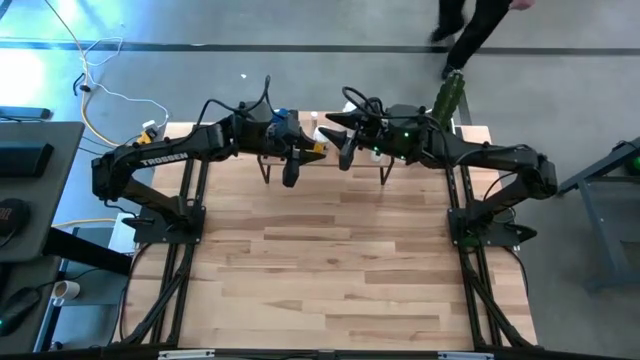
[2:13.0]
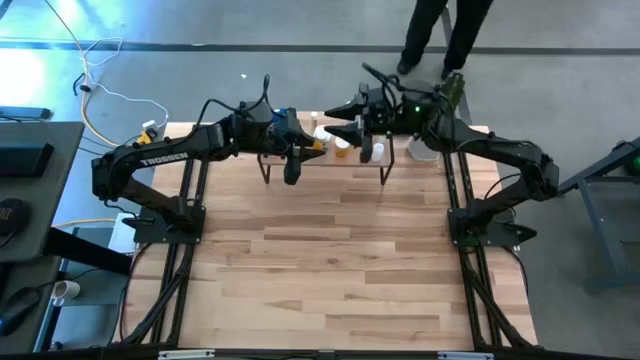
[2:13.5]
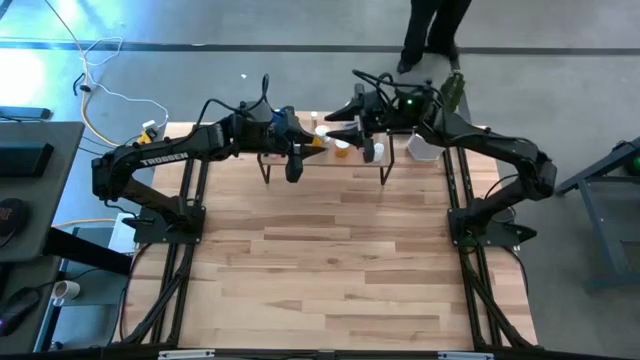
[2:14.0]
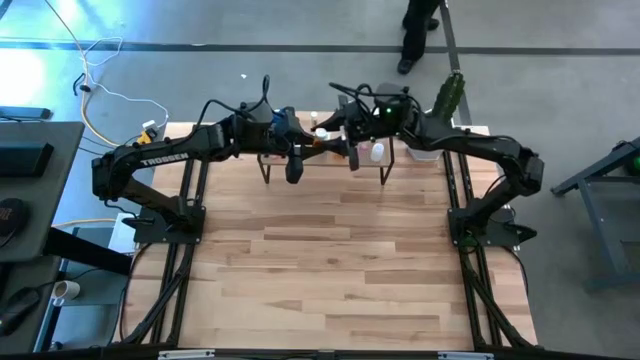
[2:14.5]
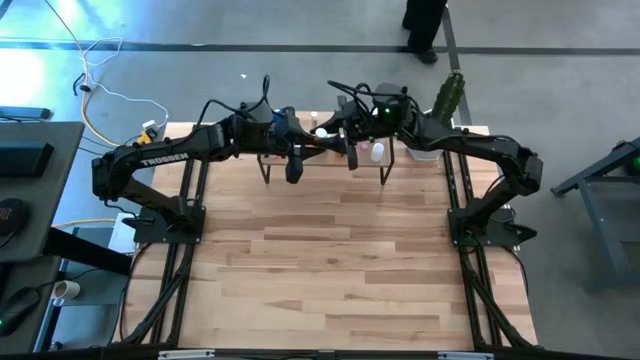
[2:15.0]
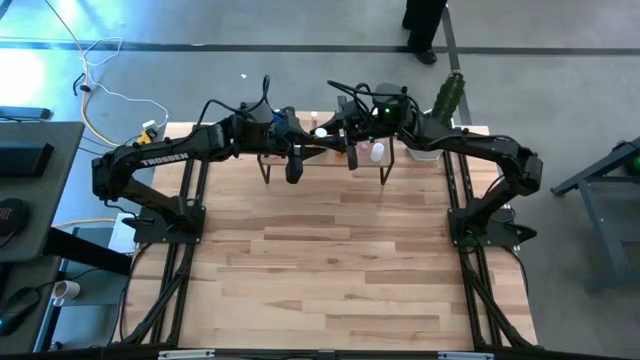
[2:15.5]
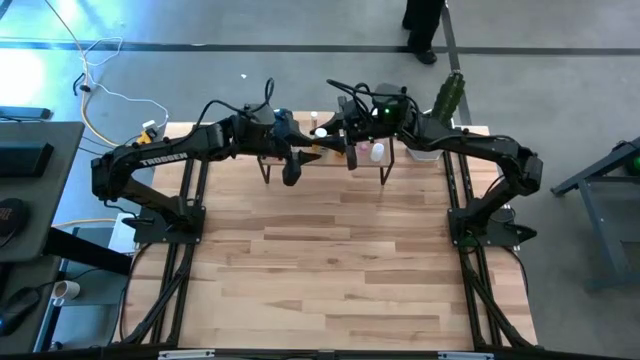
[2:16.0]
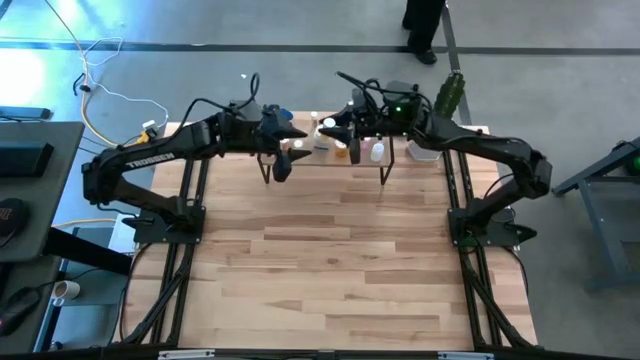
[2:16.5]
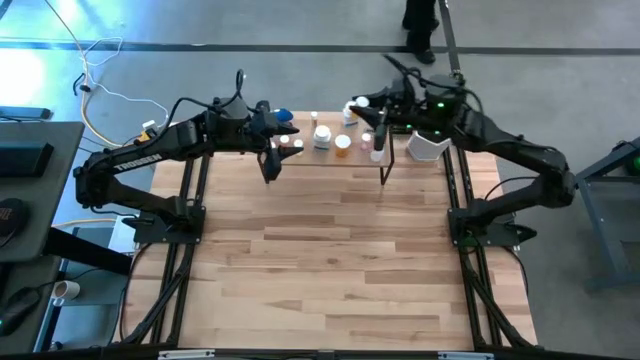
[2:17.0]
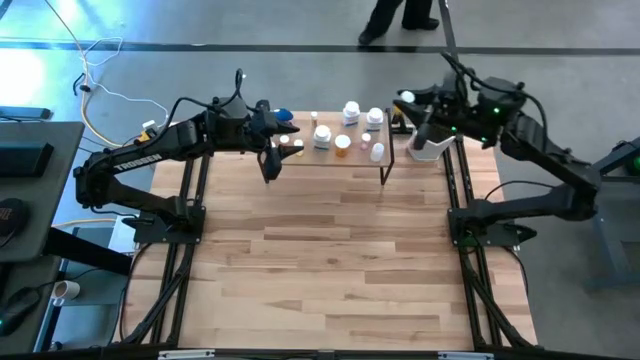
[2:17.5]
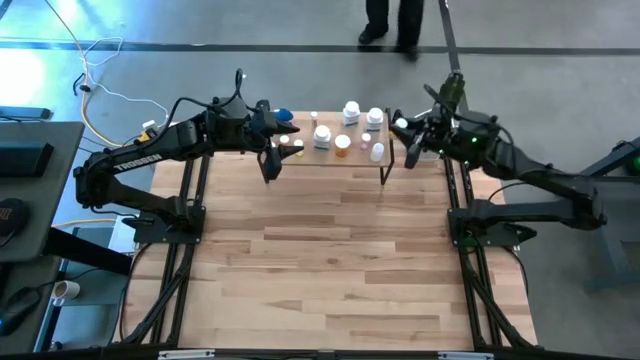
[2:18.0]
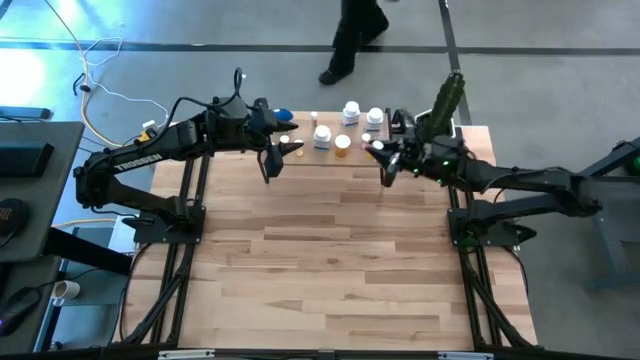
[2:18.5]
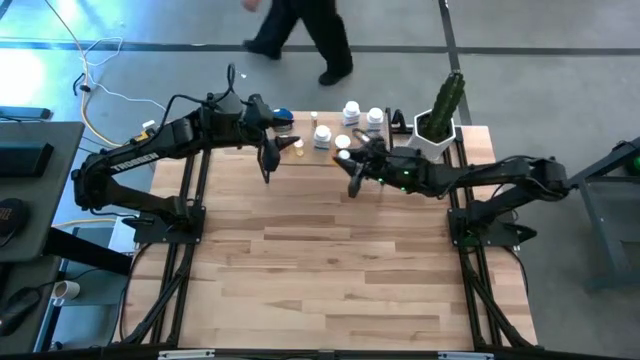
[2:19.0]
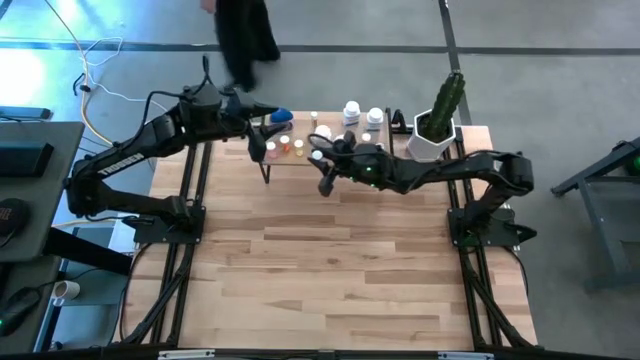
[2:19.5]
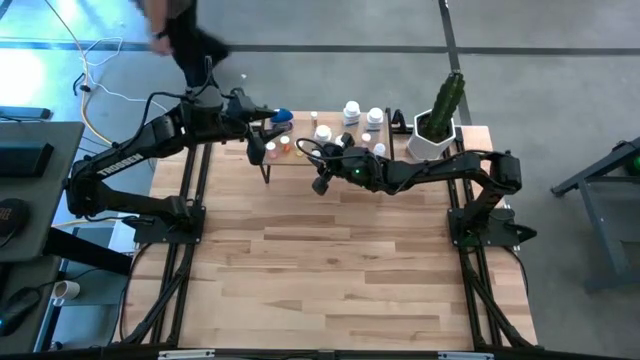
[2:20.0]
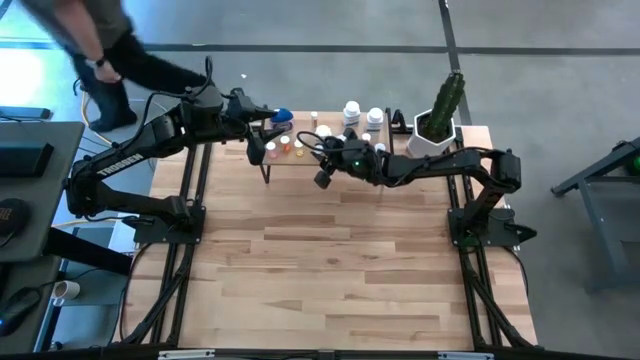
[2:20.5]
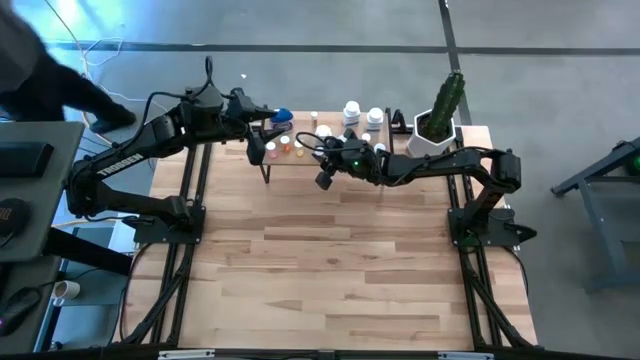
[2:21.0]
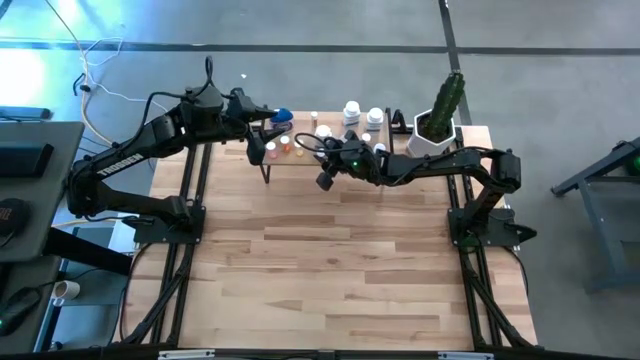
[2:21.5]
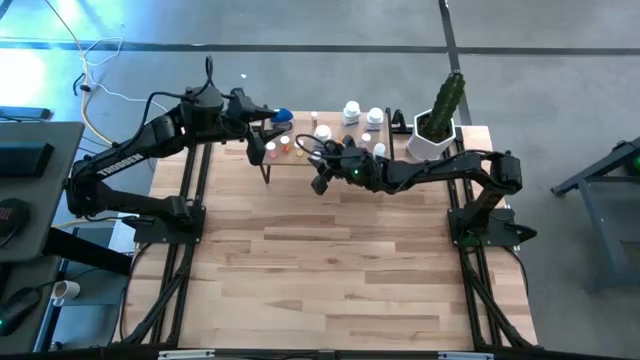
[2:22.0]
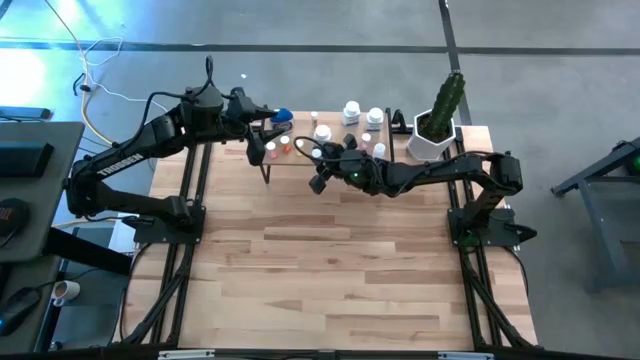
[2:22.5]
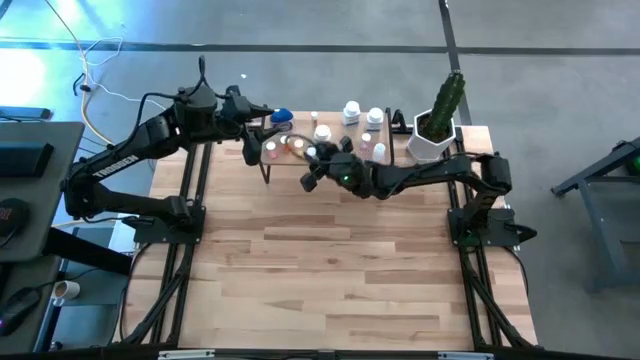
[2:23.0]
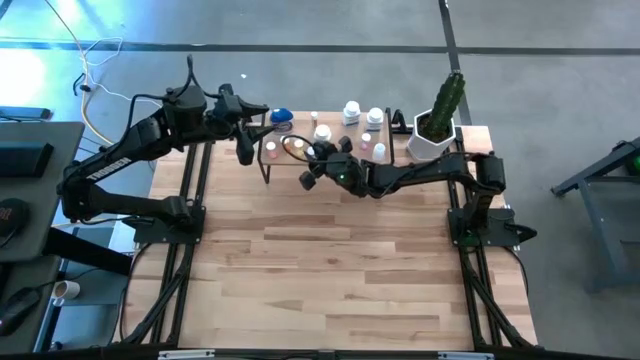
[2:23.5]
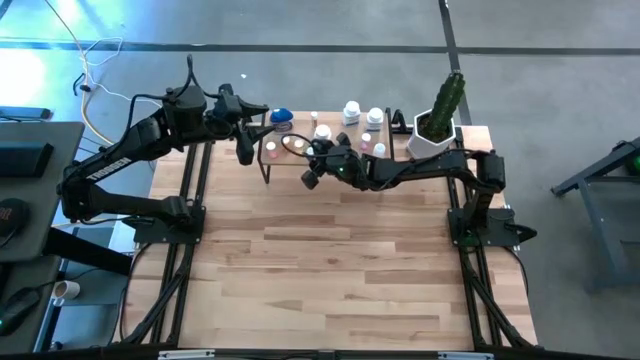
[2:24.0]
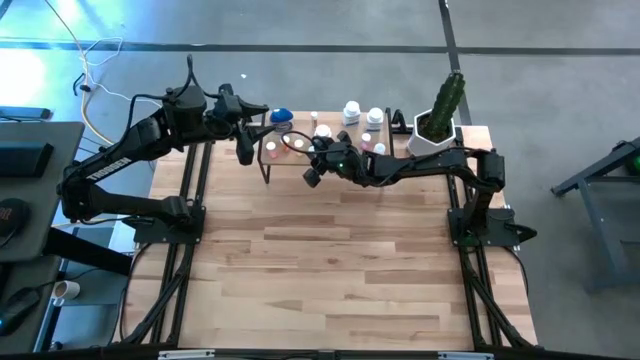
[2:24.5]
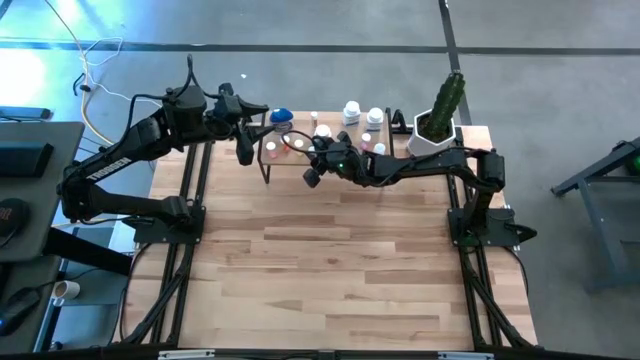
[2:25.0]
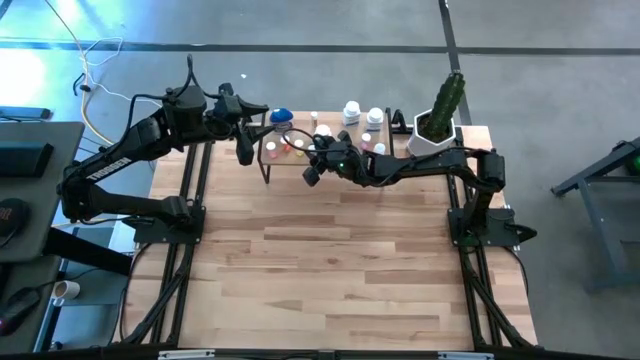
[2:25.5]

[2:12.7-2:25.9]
Task: Pick and place medicine bottles onto shelf by color
Put the orange pill bottle on the shelf

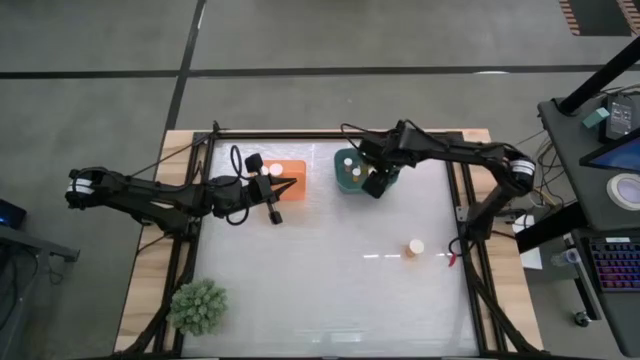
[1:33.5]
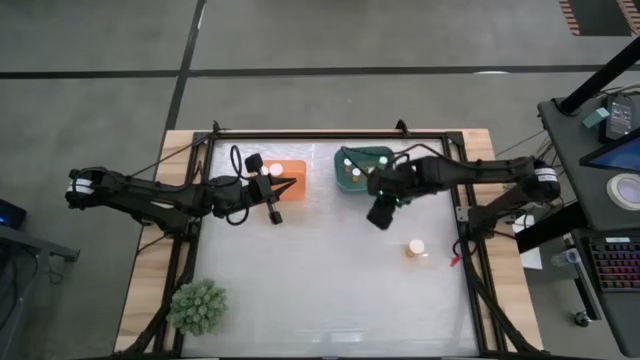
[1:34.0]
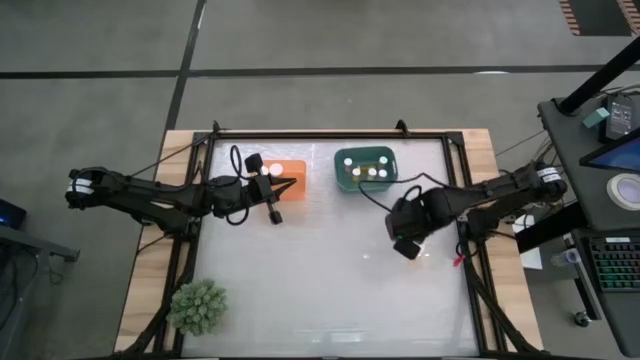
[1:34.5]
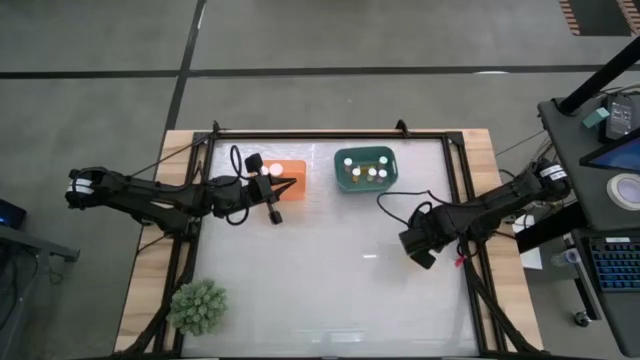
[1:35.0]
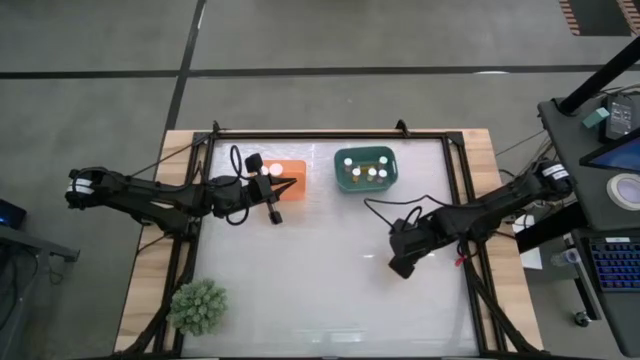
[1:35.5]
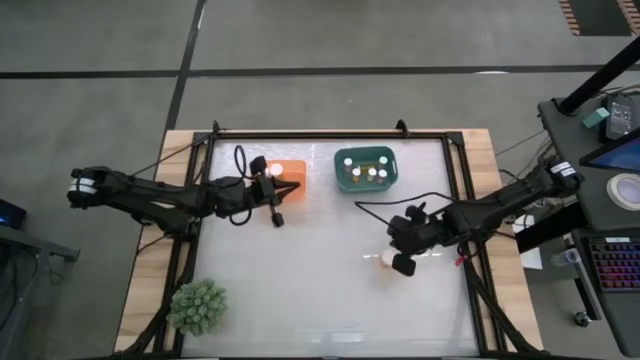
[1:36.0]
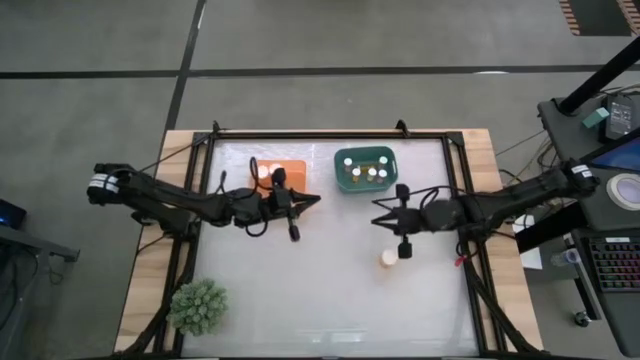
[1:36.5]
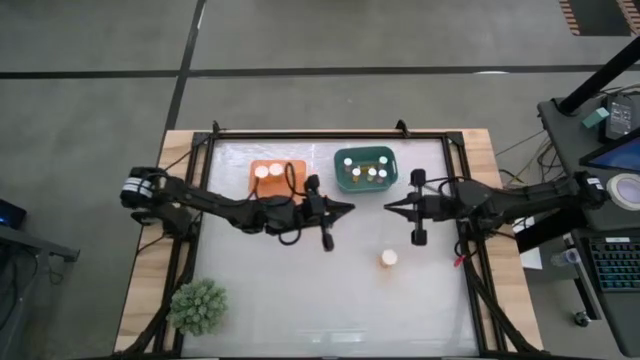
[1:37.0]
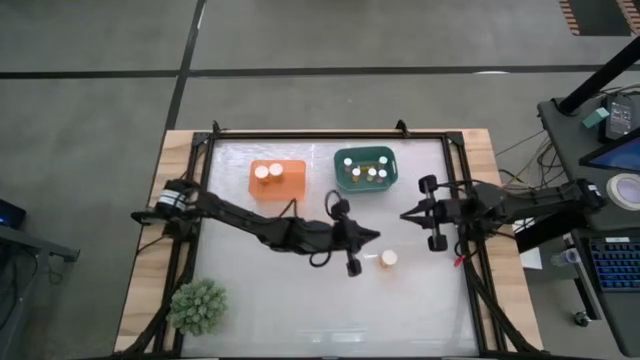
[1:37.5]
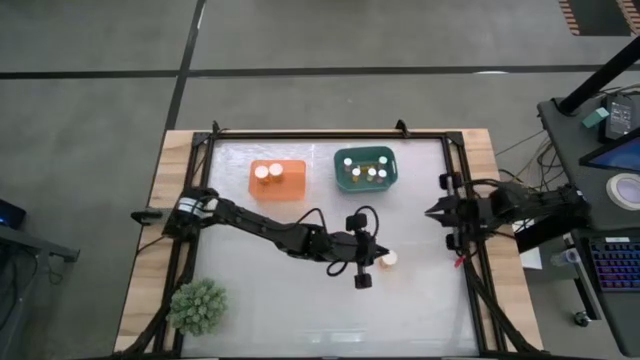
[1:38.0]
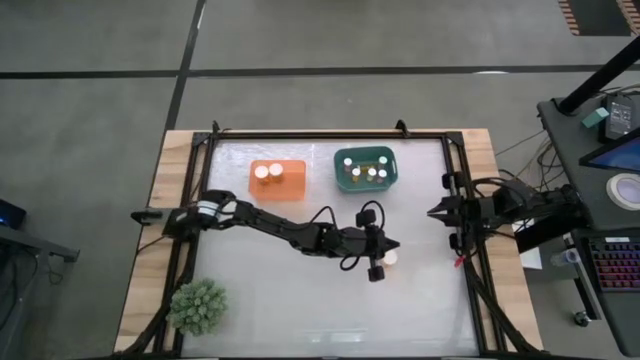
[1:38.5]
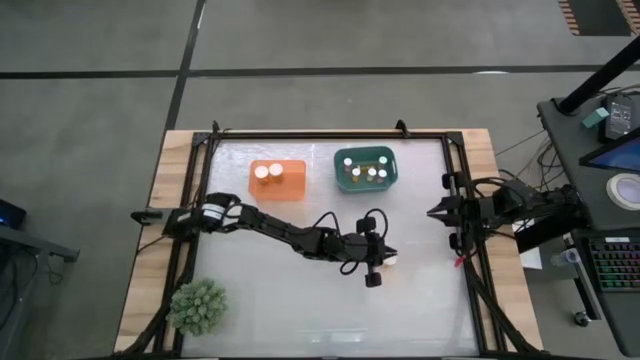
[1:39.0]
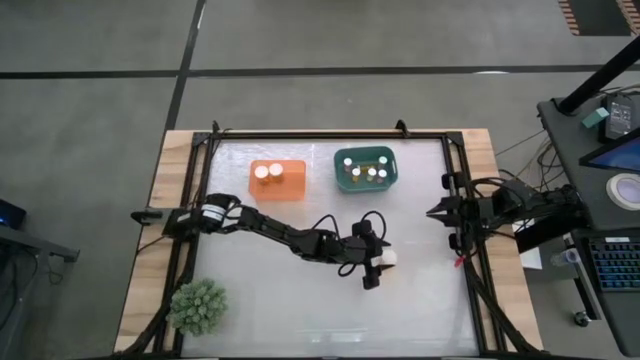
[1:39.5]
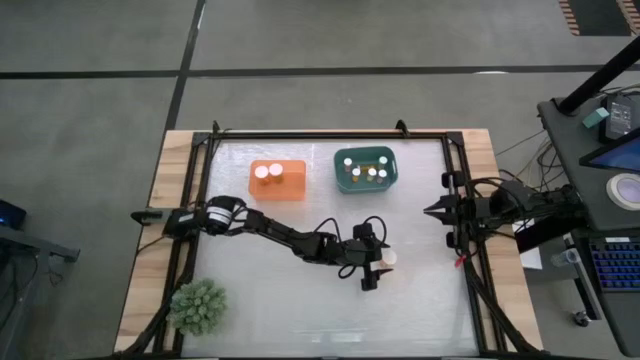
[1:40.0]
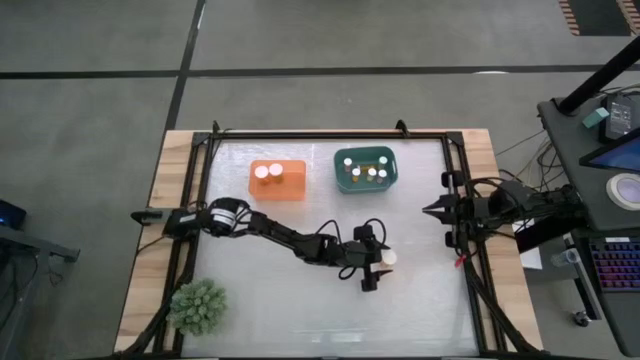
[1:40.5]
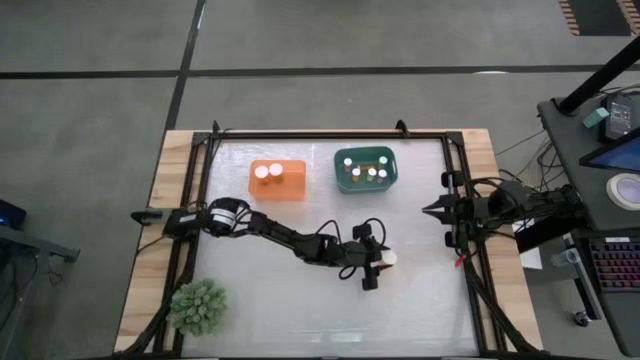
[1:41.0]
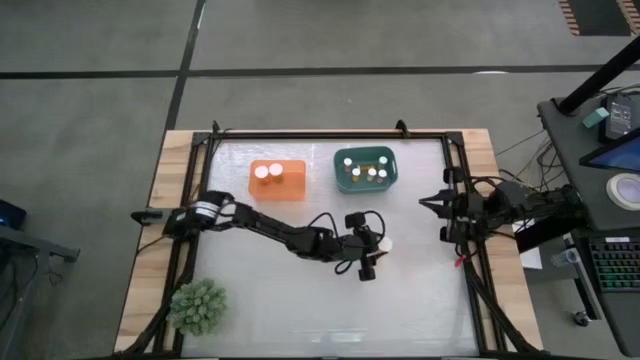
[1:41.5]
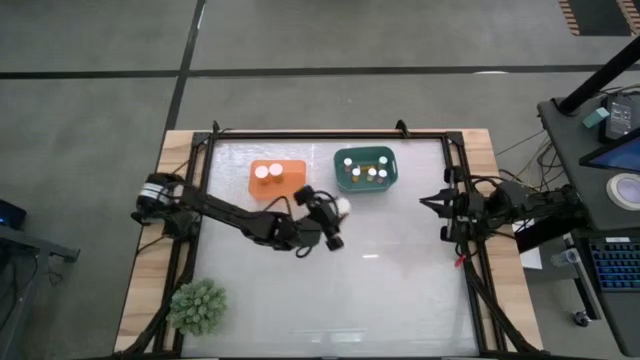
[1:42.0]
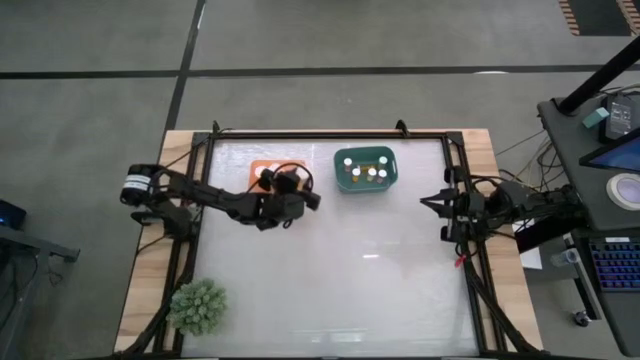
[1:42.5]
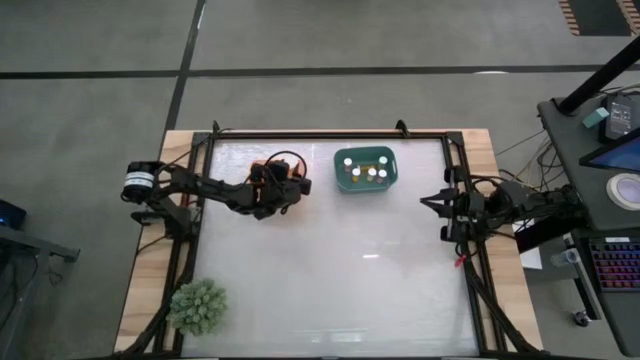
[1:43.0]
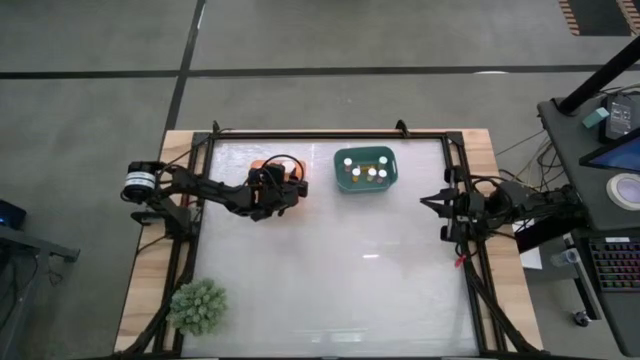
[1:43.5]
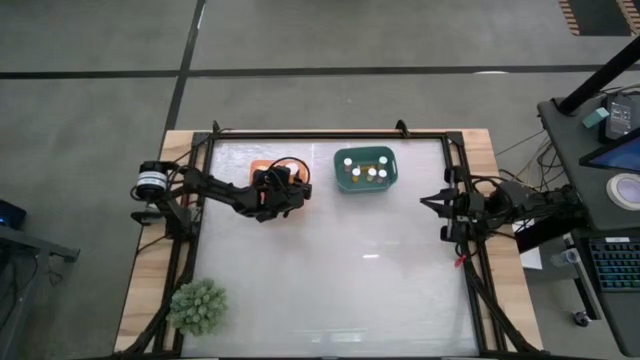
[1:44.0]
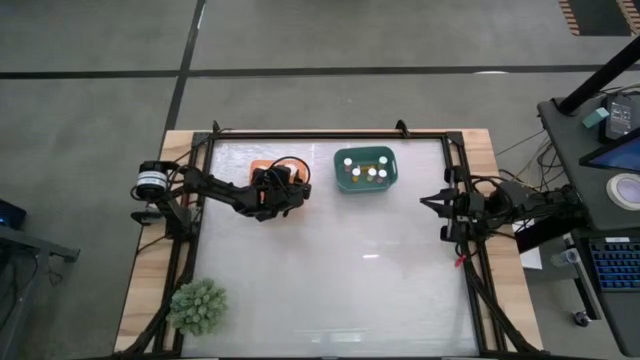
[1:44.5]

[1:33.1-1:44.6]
Task: Pick and place medicine bottles into bin by pill shape (circle, oval)
Put the large orange pill bottle into the orange bin
